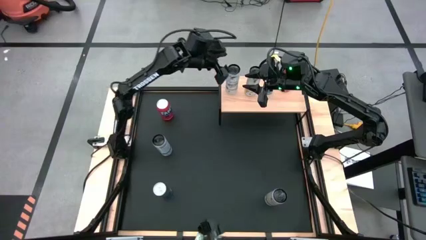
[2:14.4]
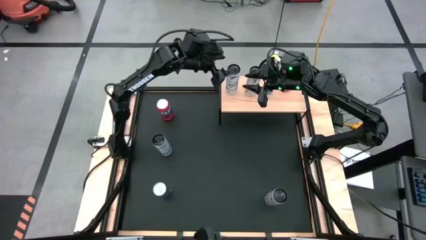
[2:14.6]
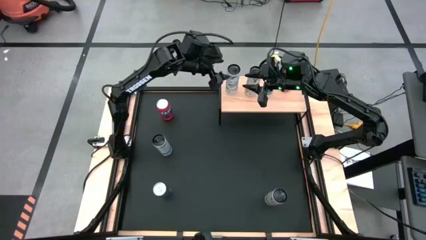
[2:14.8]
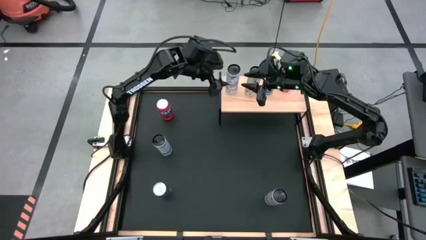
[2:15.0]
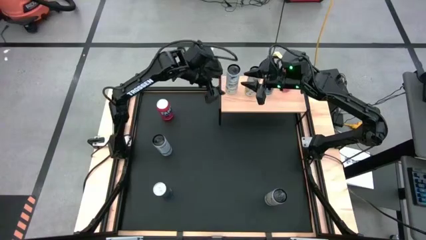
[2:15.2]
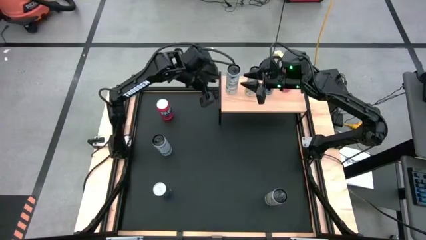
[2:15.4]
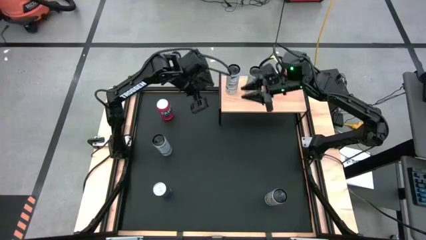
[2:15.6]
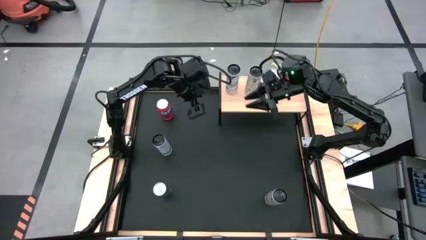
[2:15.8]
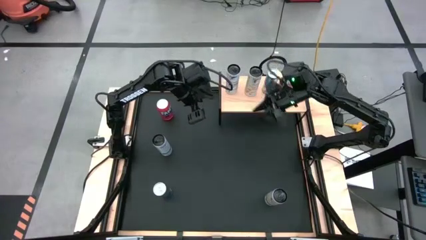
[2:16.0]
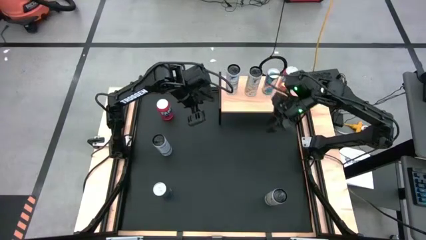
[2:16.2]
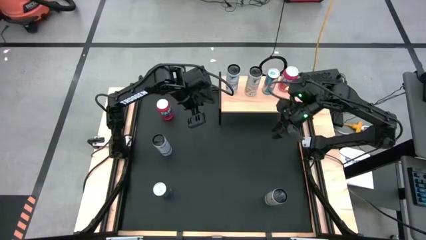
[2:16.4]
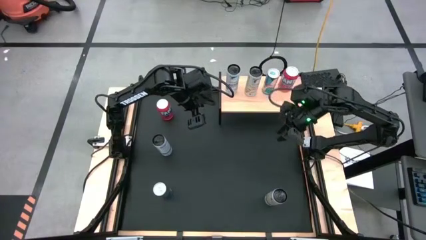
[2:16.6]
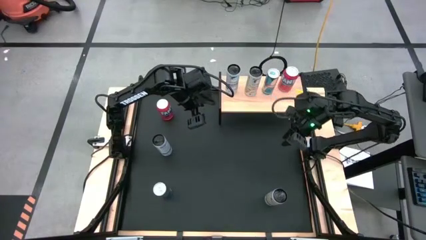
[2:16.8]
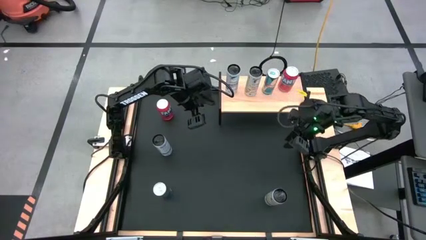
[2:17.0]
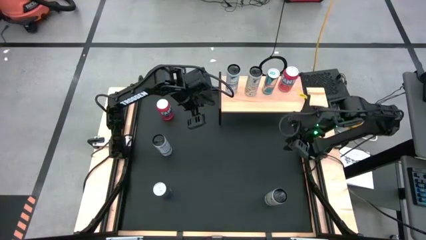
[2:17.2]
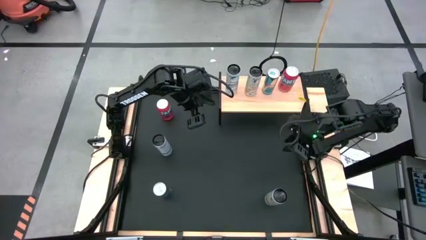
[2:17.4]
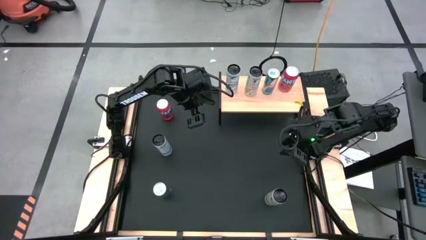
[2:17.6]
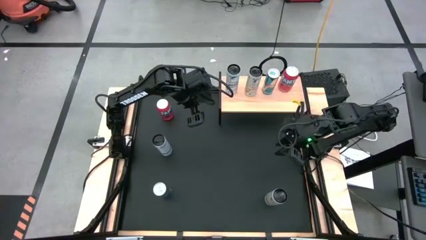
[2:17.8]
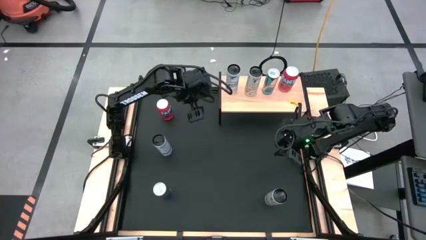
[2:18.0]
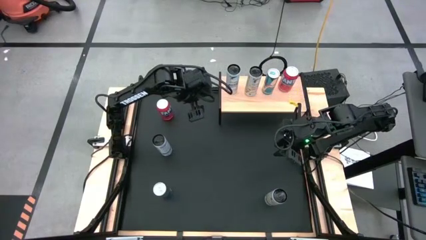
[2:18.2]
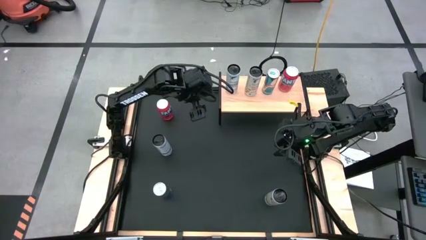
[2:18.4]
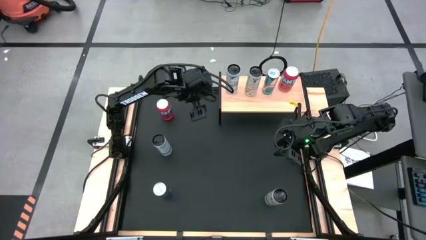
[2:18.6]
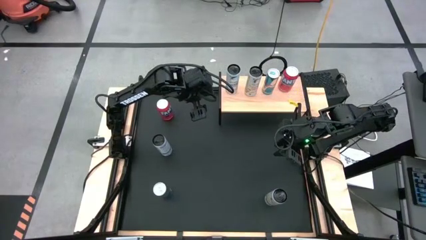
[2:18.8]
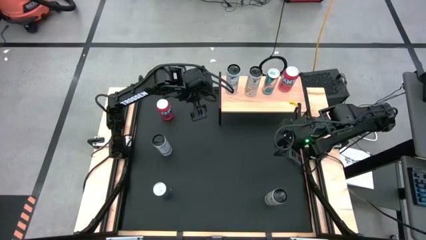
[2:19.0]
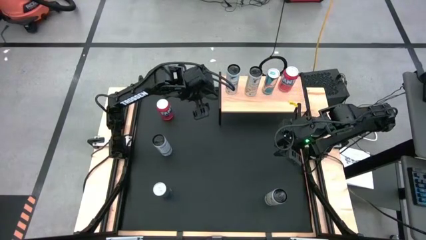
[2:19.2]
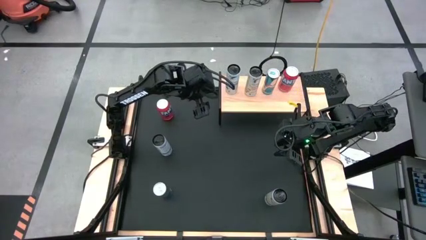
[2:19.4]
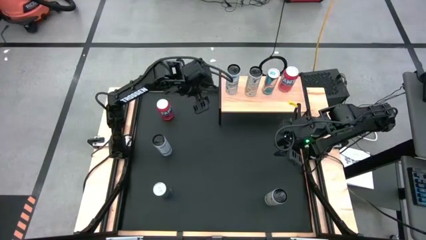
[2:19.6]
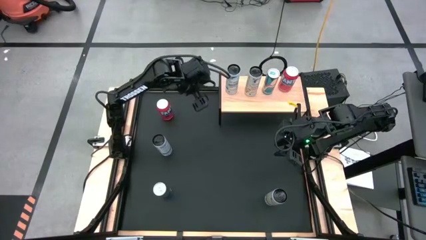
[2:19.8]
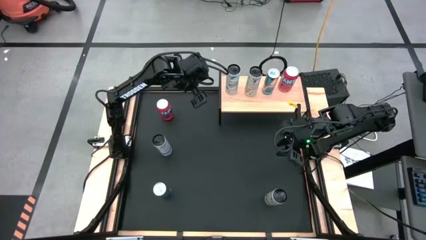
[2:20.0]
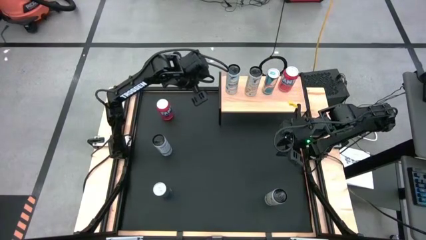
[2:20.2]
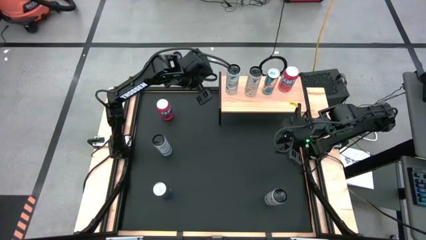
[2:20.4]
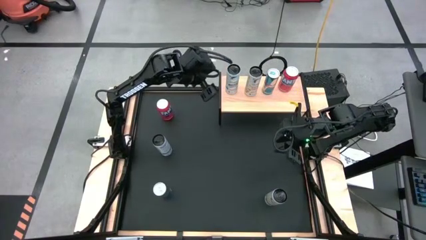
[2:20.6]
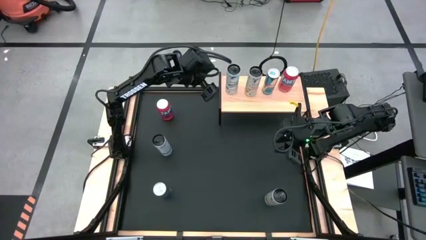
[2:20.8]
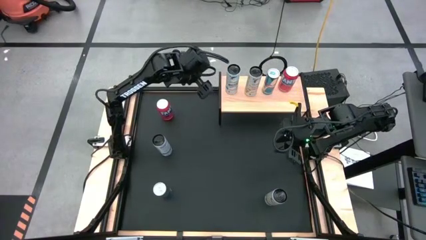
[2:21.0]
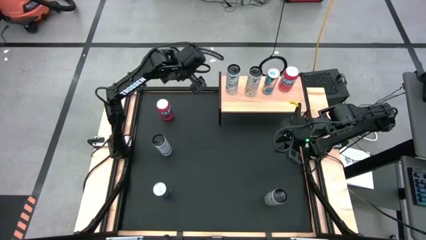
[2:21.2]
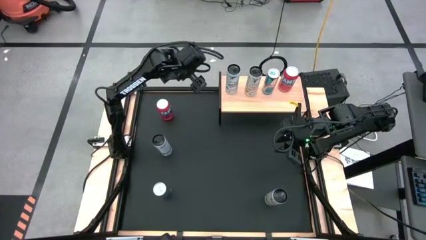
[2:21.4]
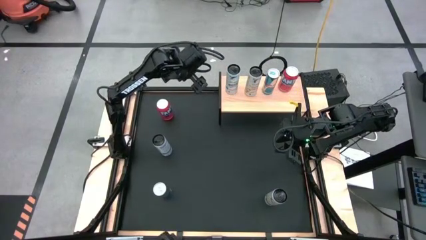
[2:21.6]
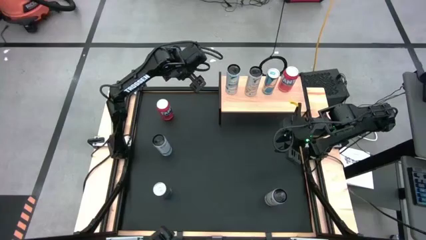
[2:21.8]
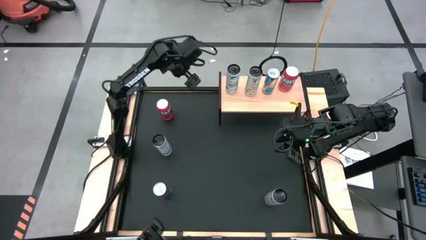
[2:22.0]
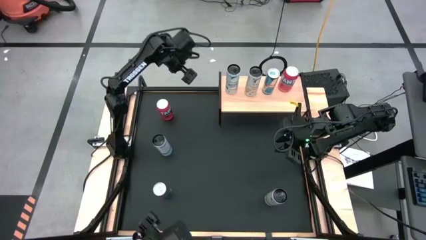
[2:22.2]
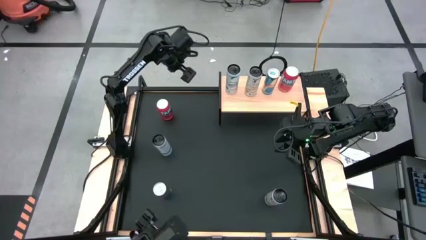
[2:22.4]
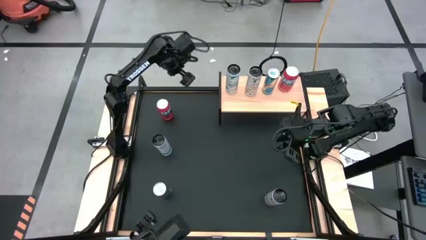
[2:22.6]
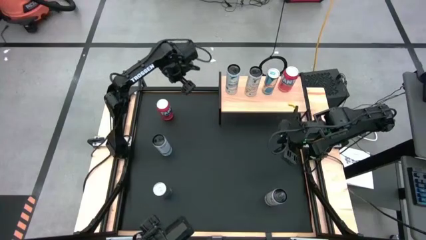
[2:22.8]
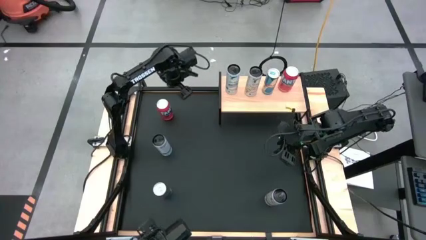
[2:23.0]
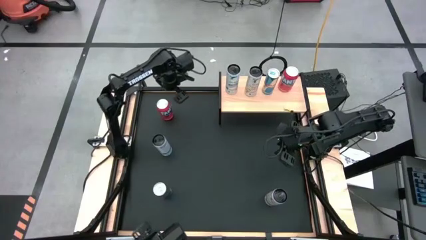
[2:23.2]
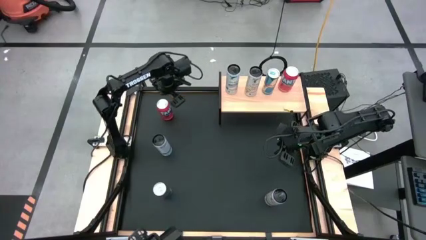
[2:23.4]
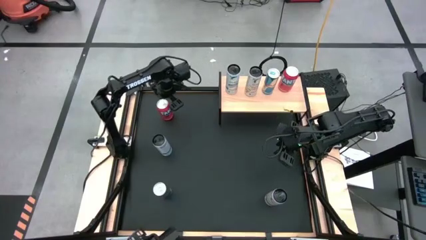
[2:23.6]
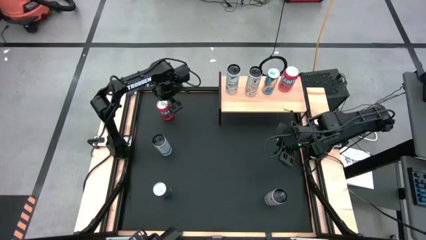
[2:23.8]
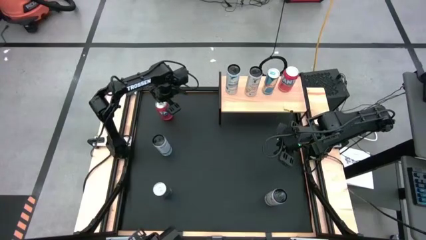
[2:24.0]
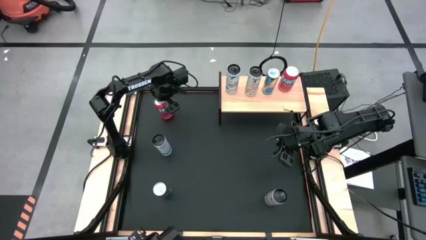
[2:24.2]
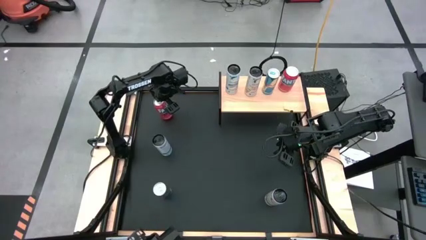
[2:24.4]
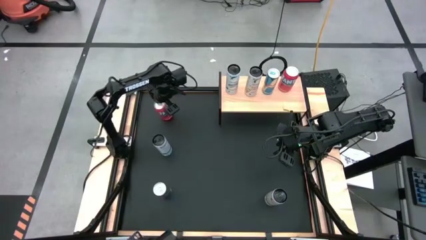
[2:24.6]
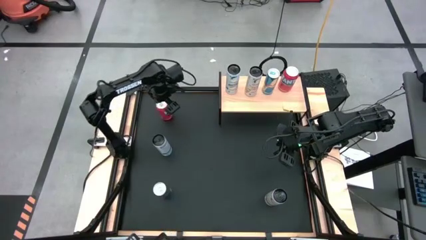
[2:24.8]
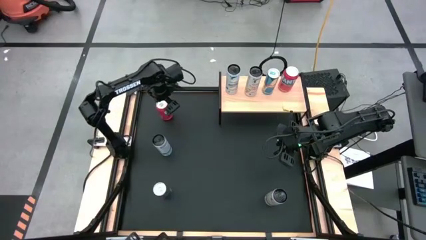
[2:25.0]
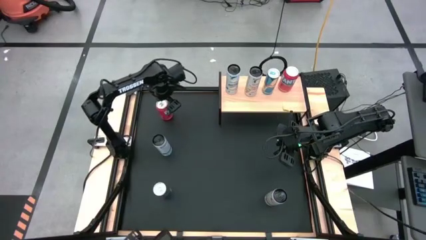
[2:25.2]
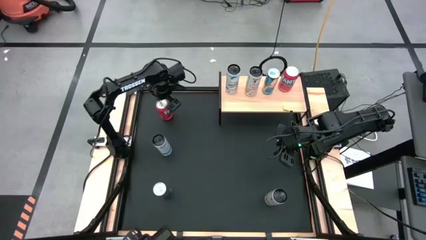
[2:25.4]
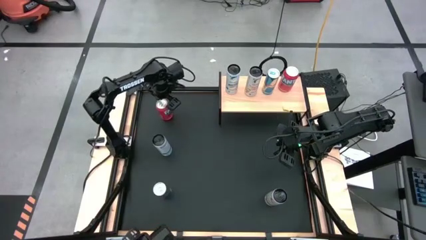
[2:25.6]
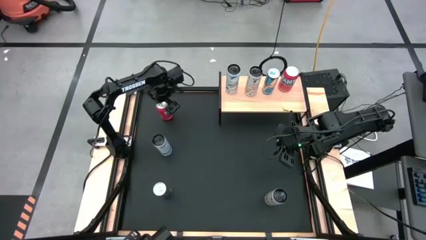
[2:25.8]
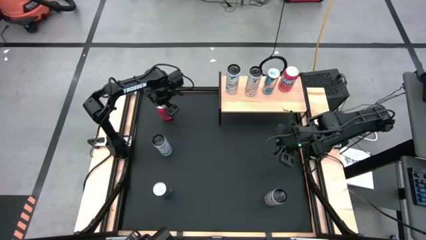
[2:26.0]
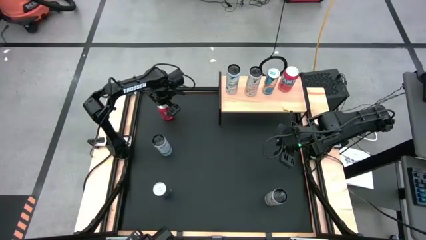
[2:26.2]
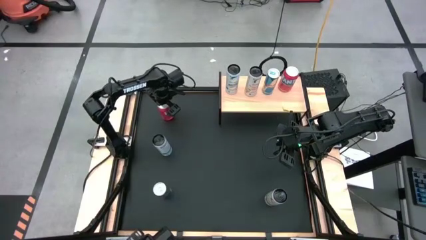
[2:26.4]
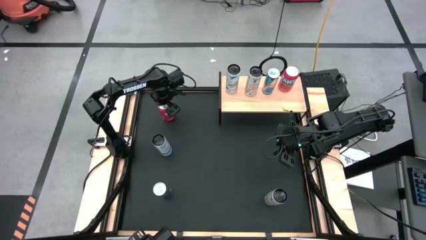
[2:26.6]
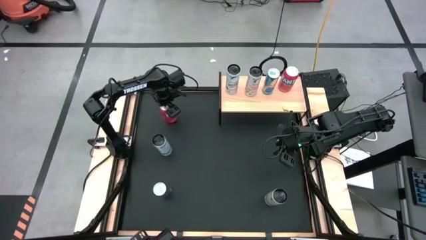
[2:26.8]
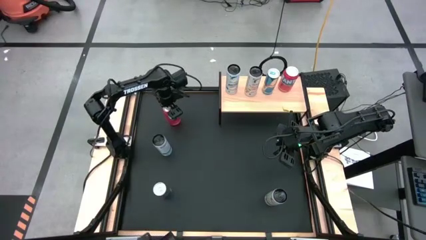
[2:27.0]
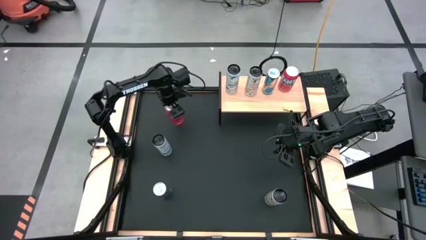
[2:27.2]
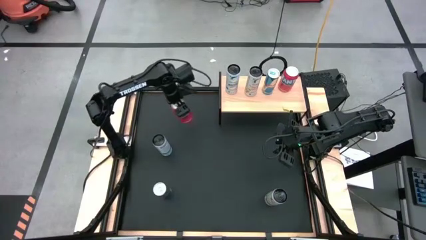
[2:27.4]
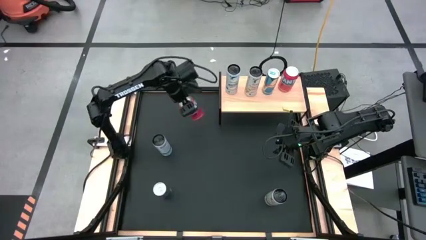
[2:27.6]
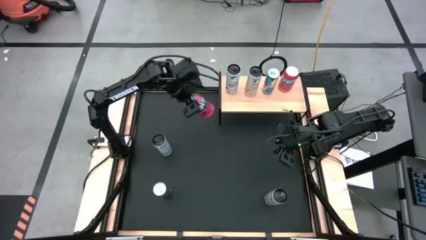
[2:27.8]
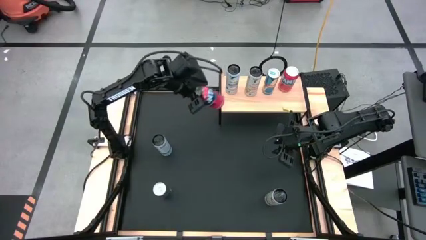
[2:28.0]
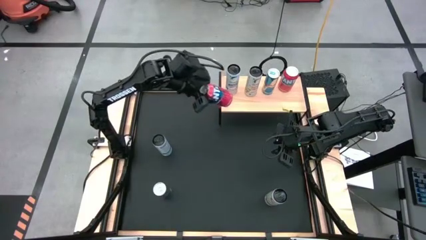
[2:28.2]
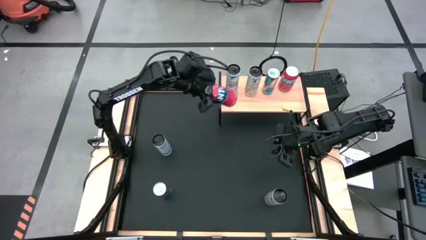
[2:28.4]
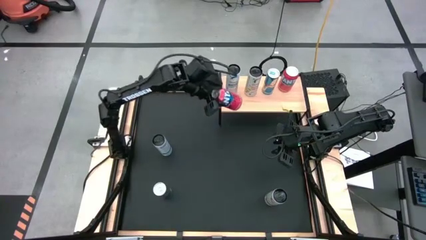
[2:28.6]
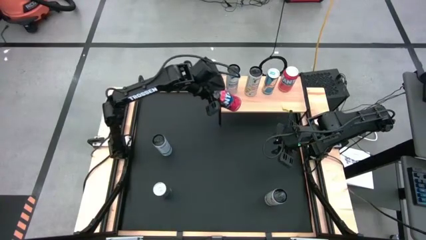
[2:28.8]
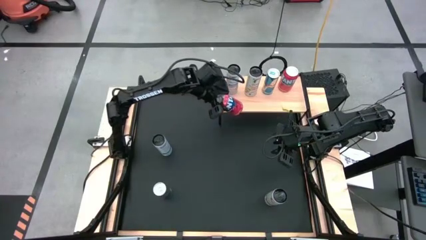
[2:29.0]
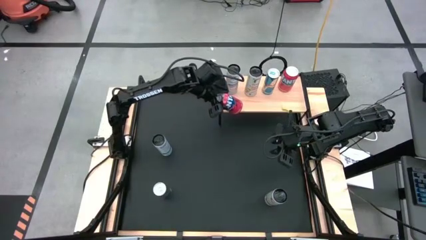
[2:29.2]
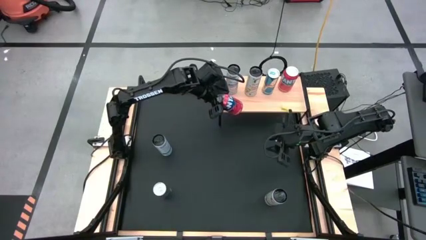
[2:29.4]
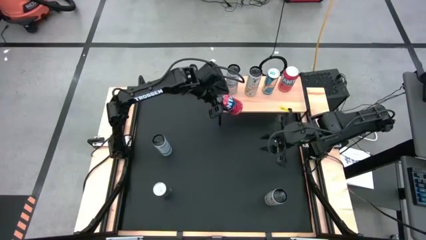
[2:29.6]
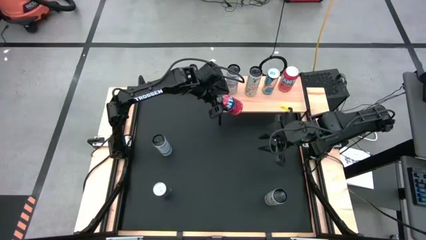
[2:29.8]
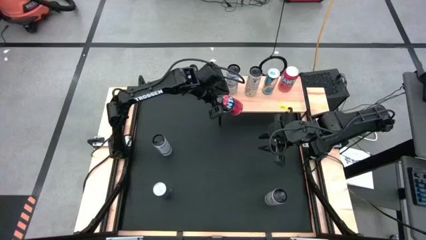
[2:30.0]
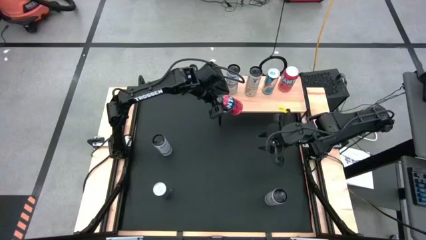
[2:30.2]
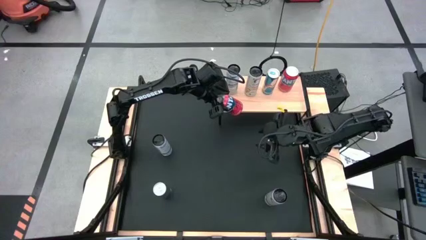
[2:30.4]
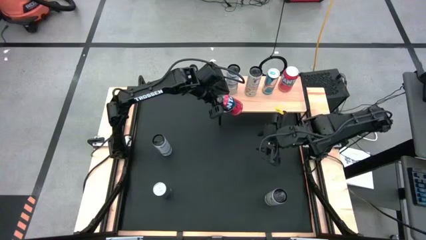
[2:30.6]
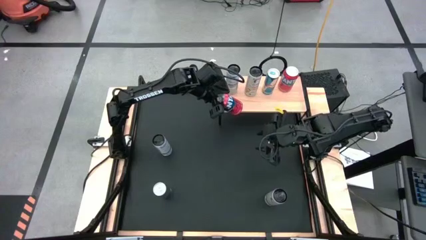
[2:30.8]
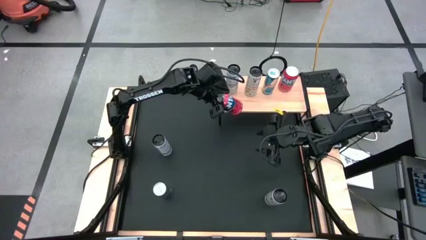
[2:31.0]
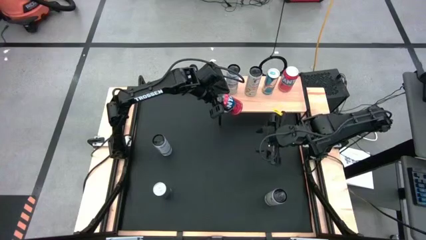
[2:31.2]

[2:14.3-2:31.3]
Task: Place canned beverage on shelf
Put the red soda can on the shelf aligned with the red soda can
